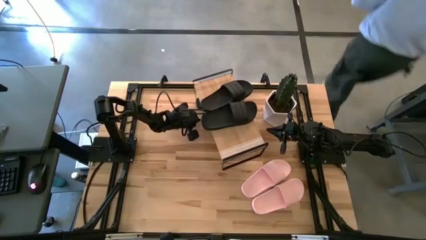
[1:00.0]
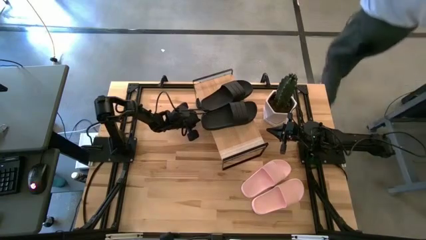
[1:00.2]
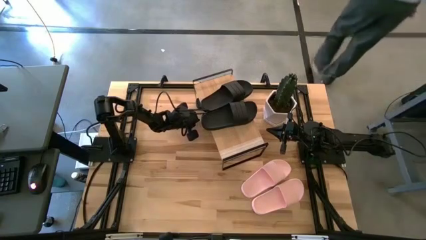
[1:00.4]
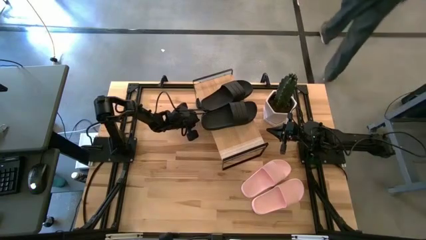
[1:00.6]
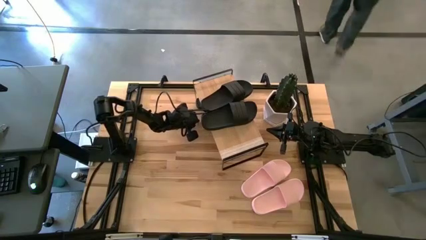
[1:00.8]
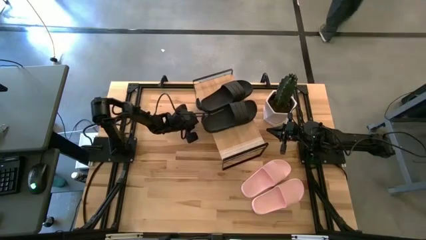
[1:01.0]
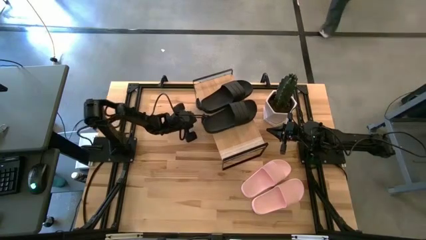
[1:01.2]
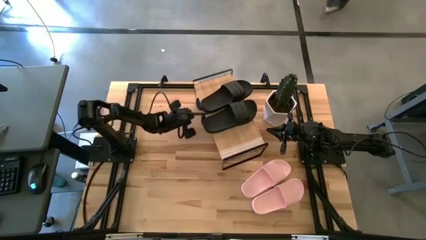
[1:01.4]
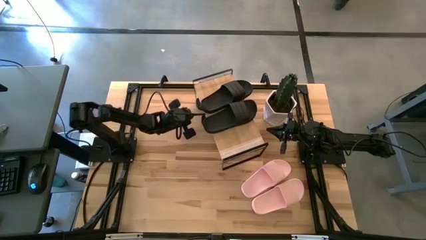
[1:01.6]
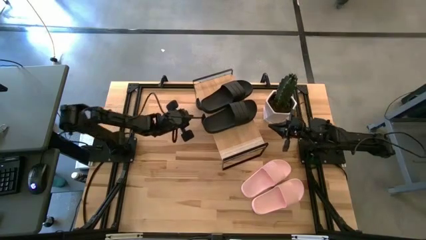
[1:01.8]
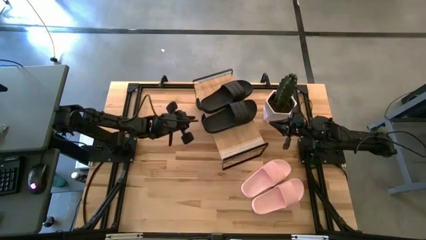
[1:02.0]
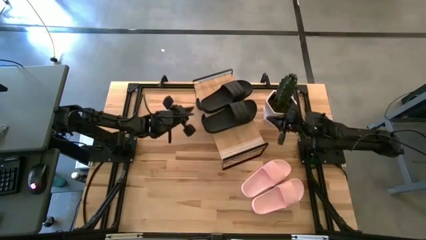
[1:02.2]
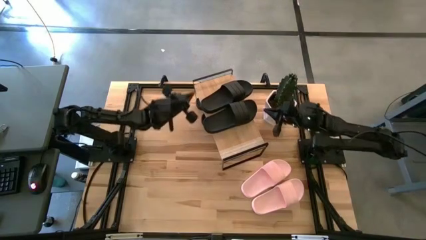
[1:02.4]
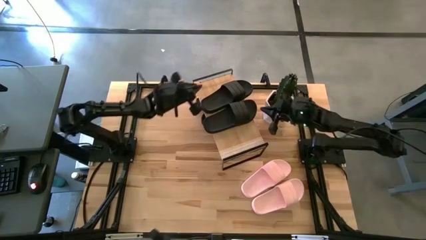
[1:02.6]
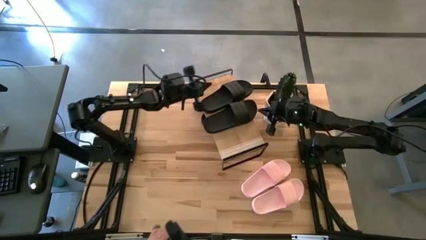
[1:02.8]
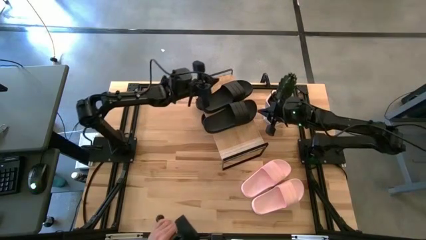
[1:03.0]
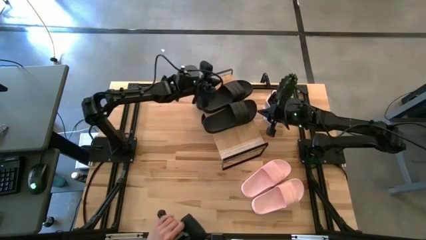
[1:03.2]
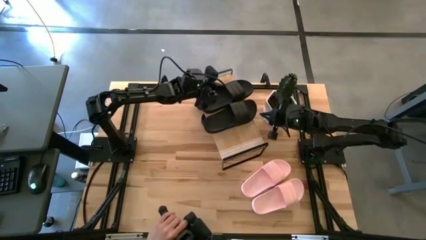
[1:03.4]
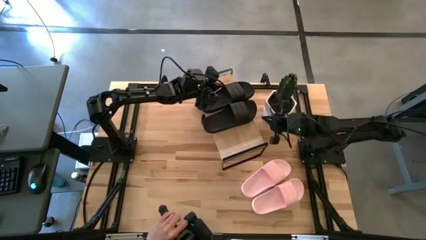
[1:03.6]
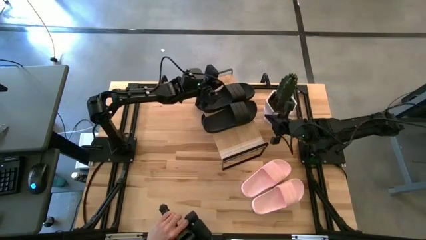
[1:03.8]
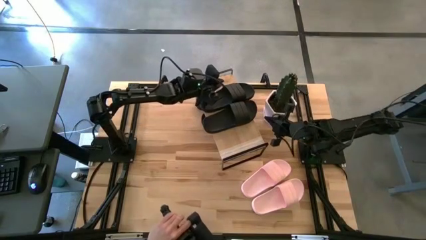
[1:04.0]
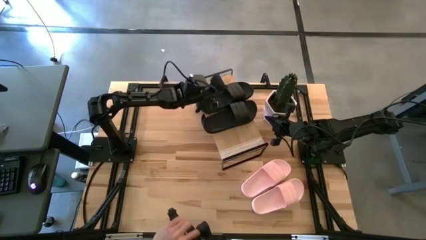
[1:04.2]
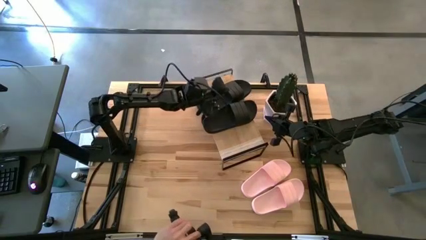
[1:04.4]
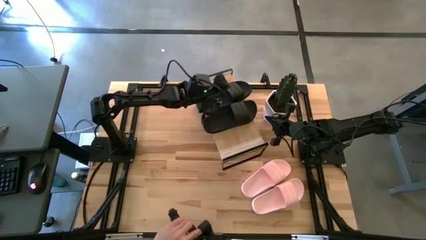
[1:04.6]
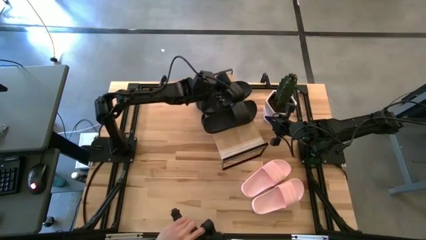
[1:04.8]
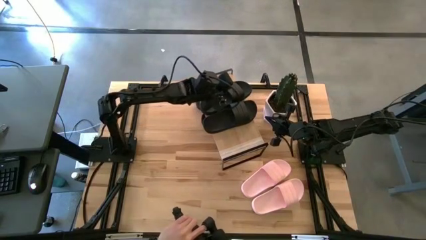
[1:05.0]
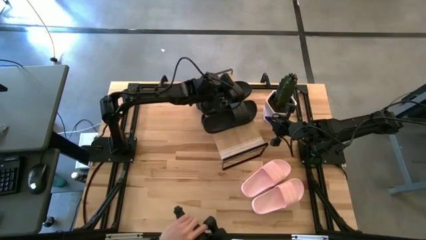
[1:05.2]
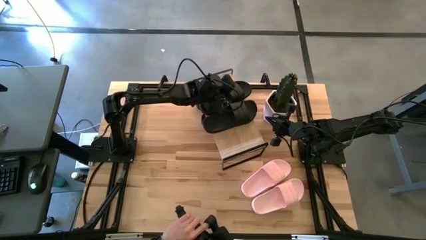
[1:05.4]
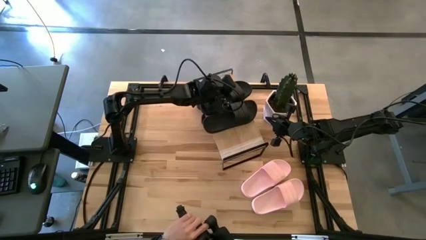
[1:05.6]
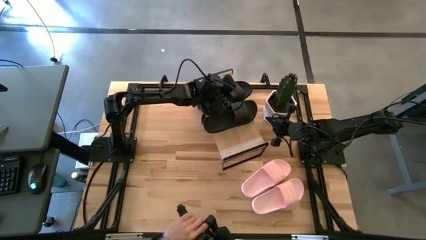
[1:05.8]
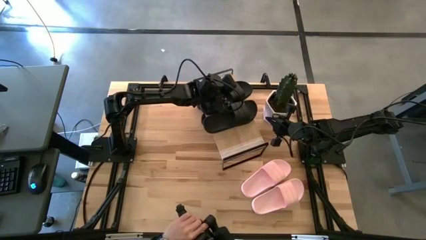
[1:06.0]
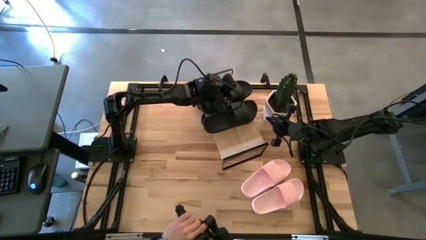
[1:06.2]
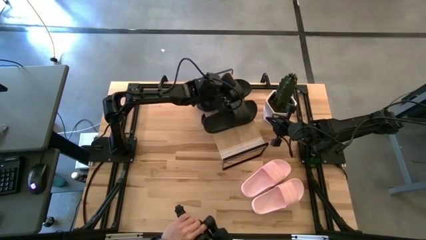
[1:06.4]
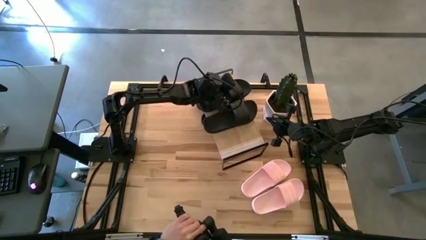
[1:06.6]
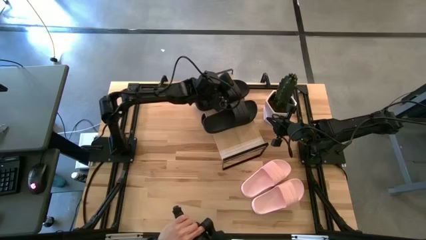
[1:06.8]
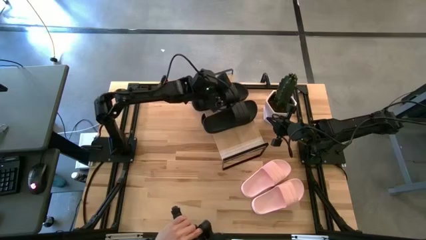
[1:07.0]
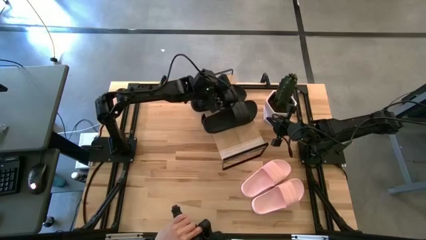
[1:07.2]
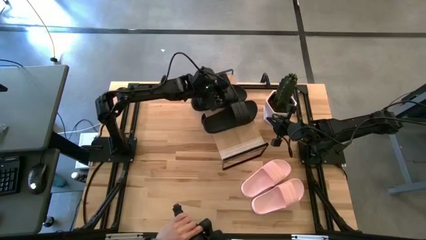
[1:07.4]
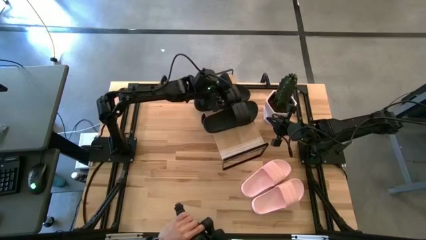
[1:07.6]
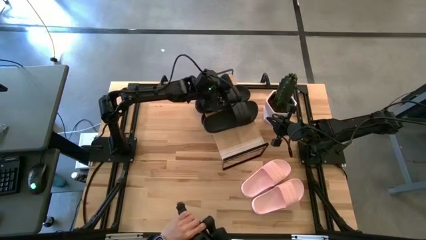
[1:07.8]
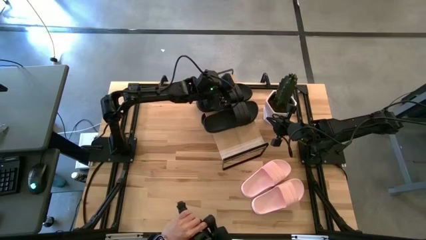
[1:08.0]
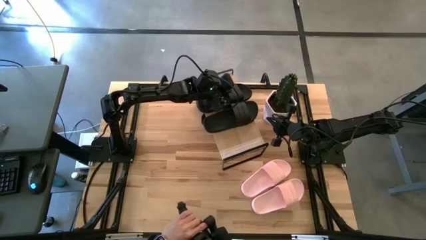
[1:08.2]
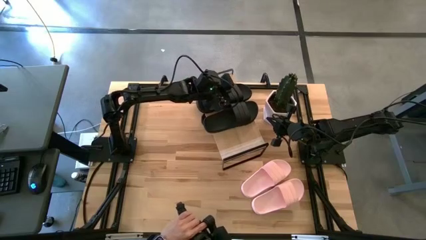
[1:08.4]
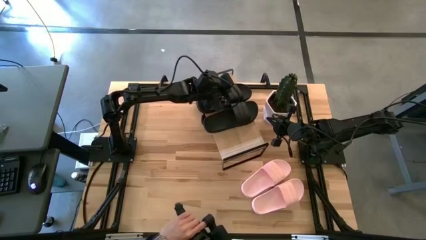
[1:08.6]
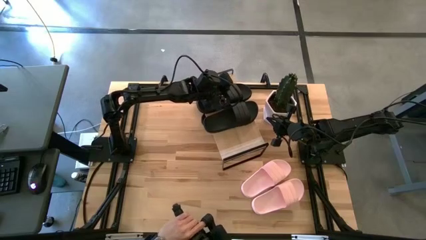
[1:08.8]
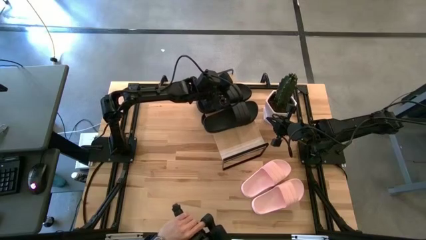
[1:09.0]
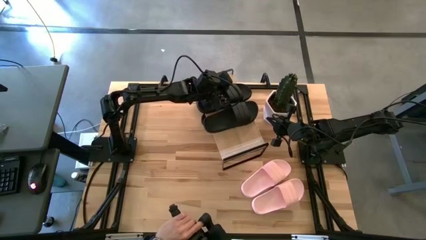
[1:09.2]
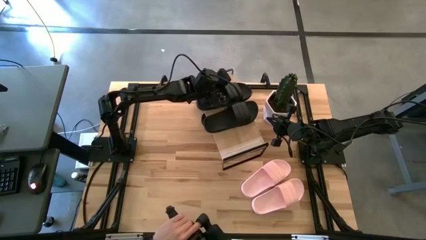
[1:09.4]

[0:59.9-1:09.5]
Task: Pick and place slides into the shelf
Adjust the black slide on the shelf

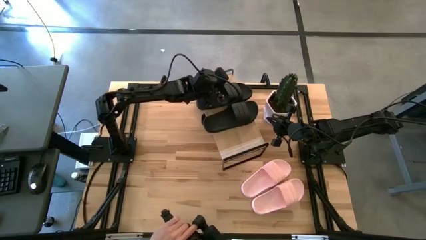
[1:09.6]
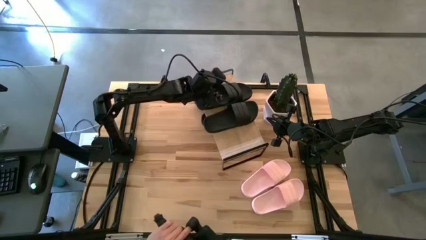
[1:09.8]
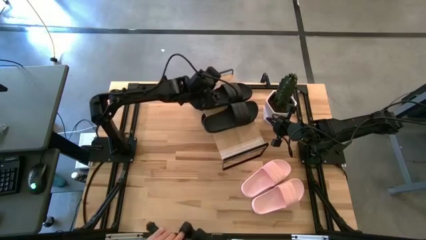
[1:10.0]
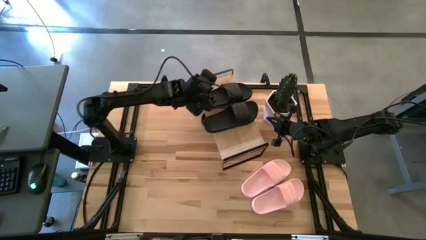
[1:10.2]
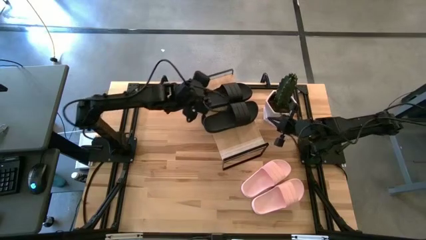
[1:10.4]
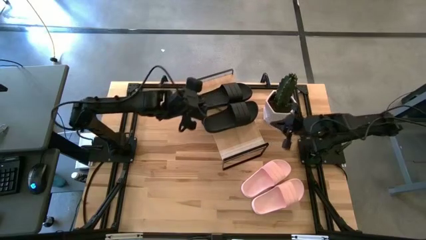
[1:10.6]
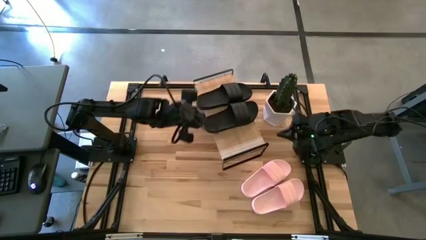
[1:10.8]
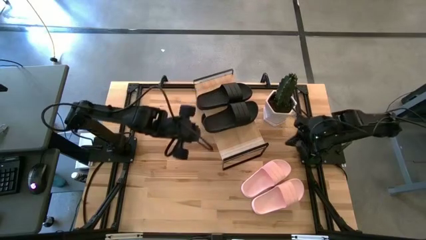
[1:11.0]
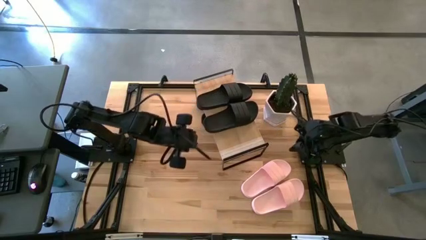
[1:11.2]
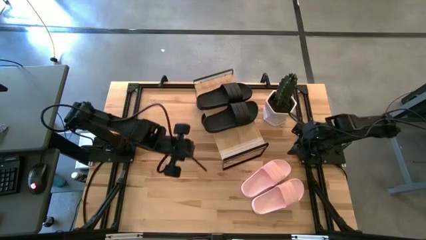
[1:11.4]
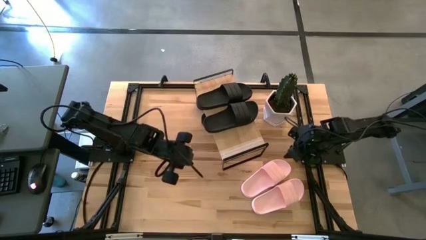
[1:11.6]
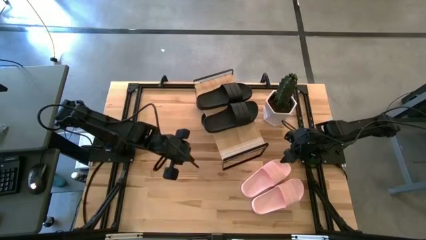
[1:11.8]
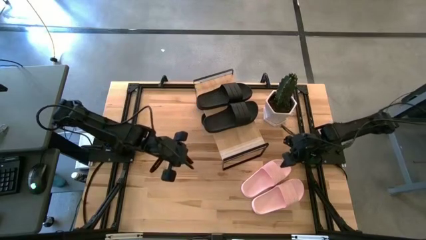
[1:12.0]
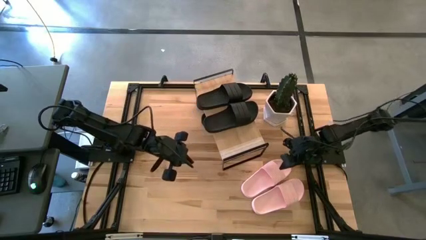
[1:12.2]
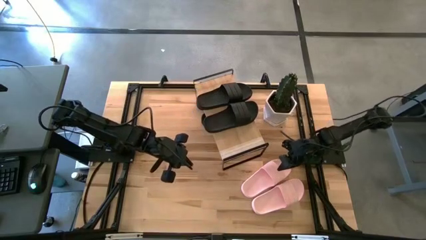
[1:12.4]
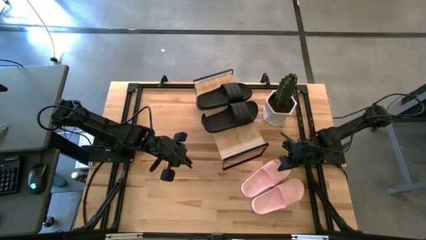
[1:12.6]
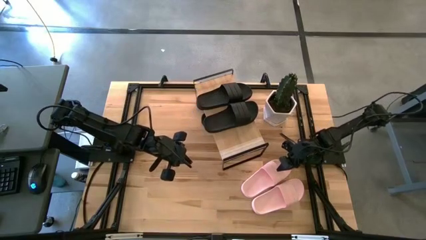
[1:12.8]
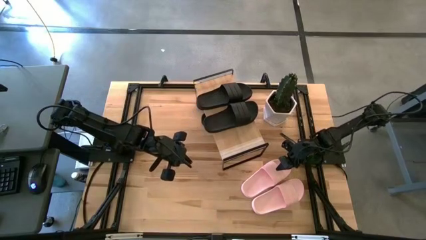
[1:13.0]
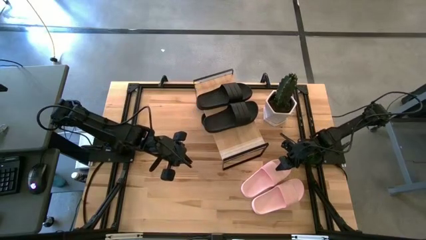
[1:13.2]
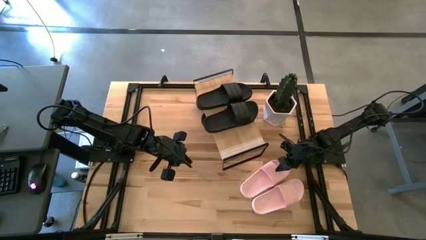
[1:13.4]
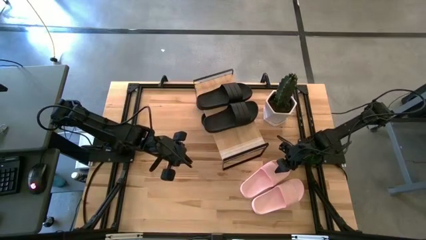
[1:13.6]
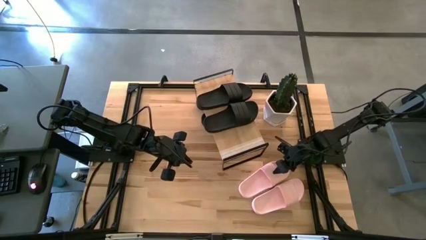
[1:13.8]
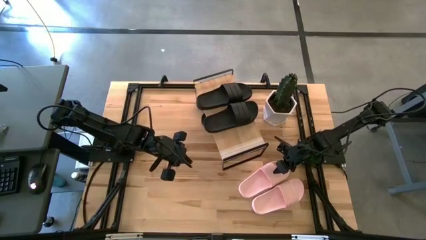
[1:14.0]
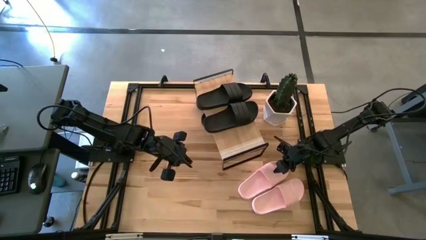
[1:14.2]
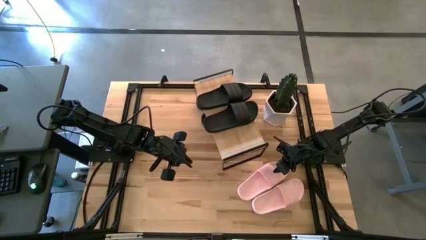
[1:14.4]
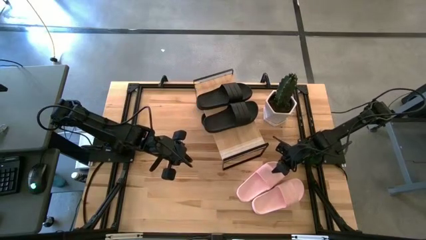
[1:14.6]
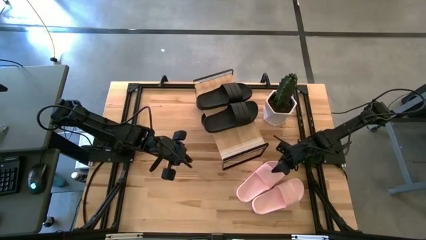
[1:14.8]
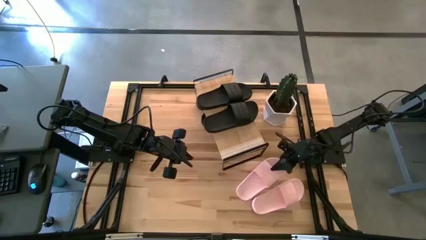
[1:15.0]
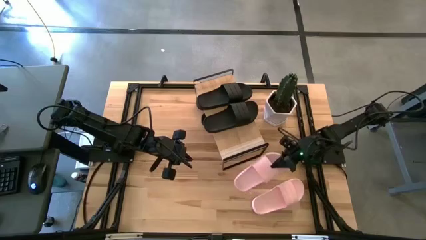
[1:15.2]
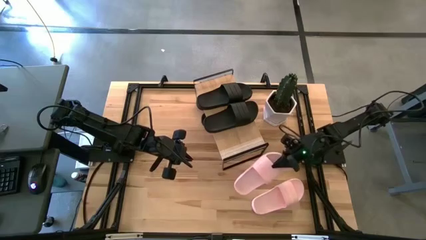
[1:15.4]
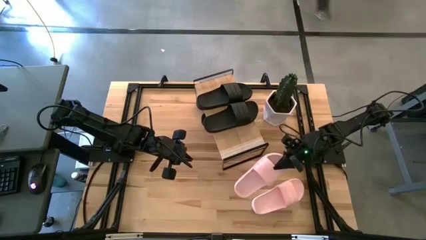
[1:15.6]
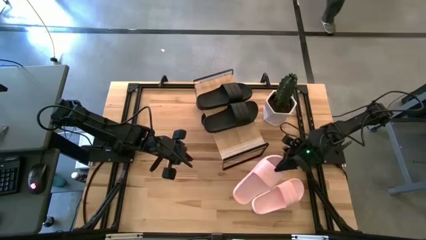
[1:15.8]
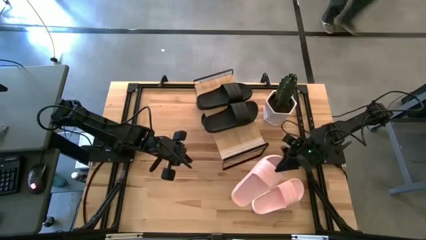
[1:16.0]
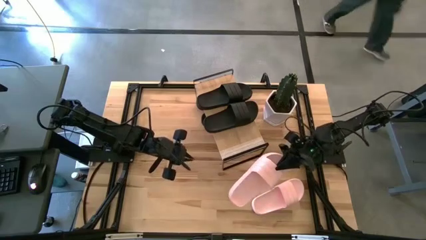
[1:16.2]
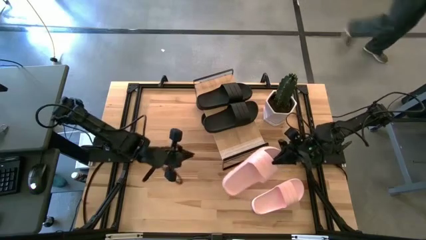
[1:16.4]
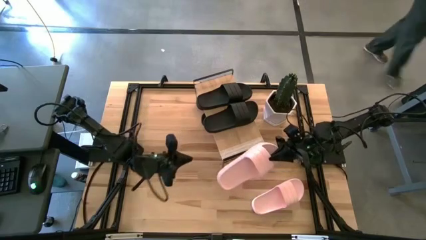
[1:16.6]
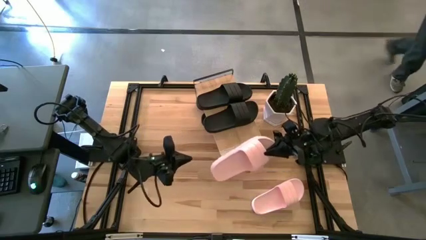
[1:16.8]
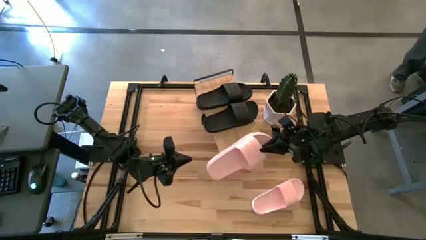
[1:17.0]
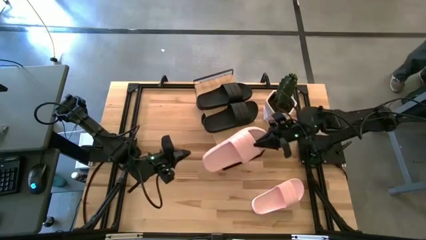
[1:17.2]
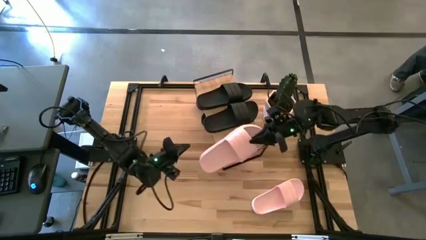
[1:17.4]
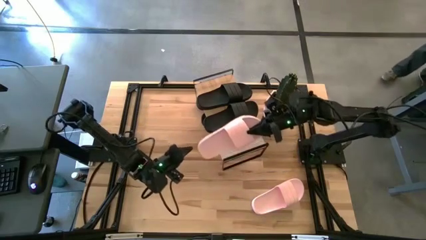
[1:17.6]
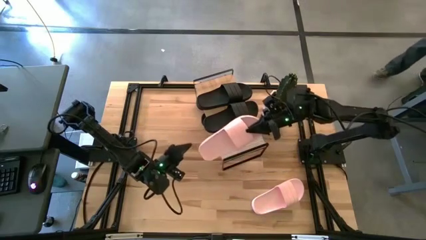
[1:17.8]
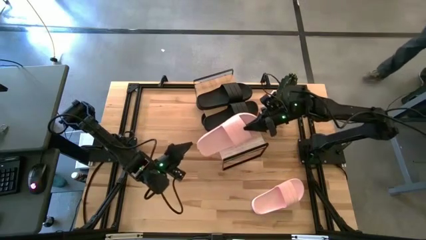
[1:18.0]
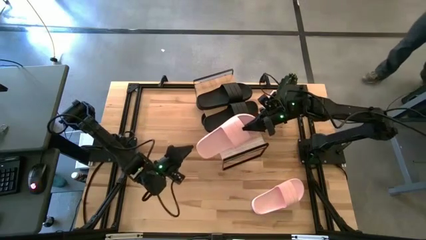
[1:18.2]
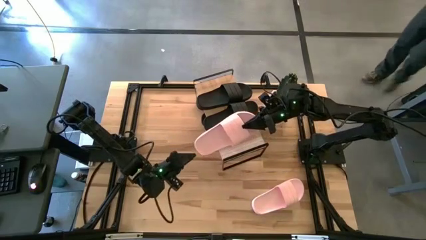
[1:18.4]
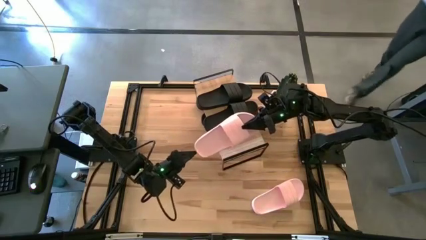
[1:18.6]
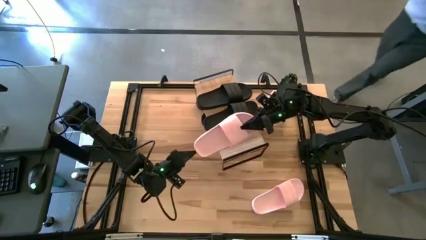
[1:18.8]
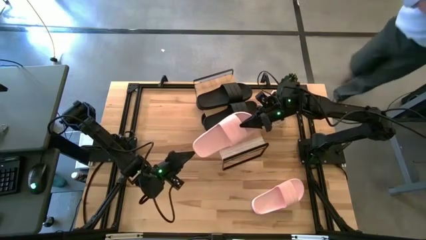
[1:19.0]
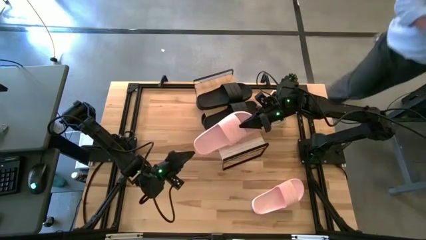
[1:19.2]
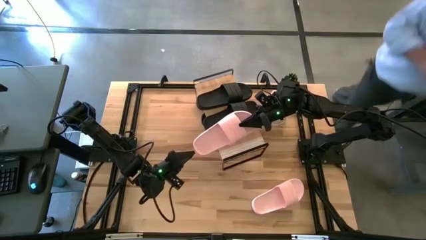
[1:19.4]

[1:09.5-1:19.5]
Put the pink slide under the shelf
